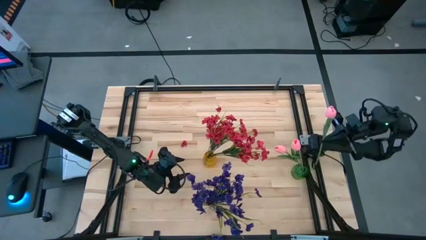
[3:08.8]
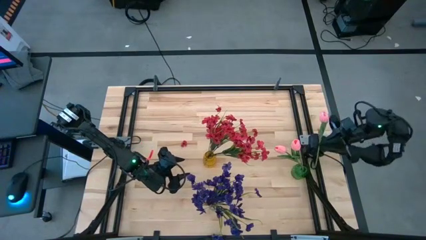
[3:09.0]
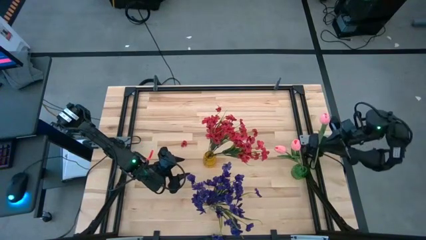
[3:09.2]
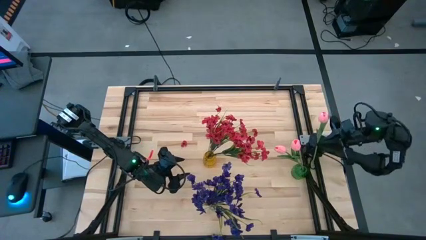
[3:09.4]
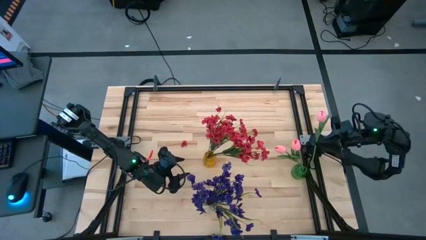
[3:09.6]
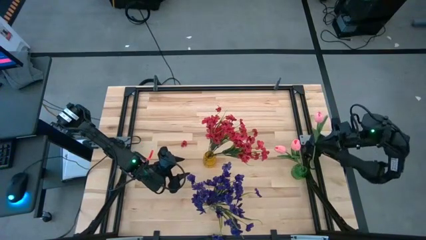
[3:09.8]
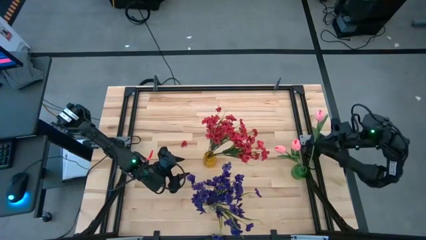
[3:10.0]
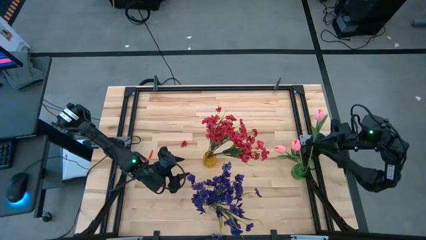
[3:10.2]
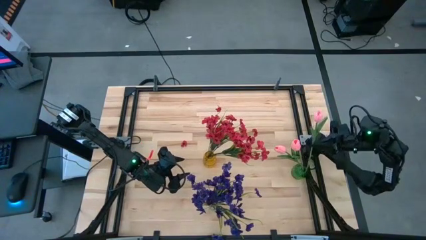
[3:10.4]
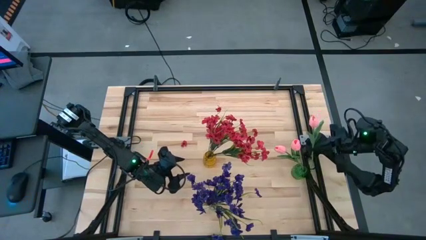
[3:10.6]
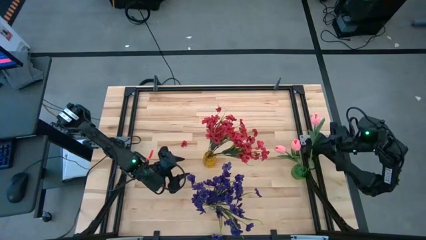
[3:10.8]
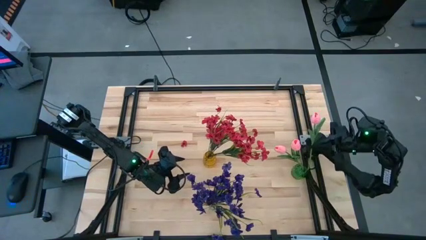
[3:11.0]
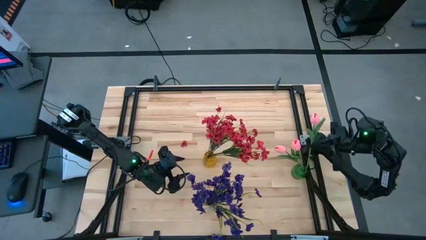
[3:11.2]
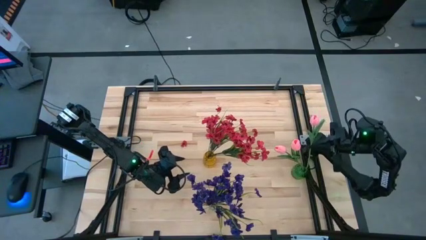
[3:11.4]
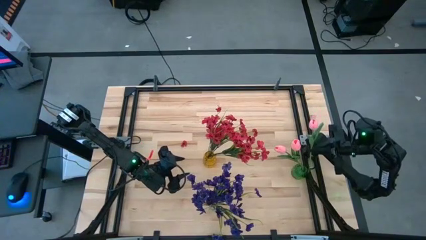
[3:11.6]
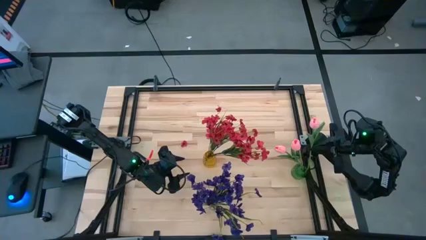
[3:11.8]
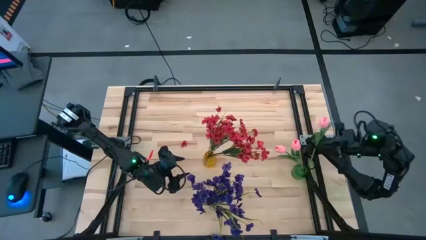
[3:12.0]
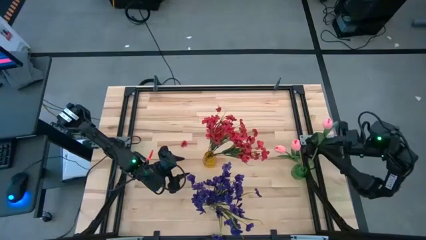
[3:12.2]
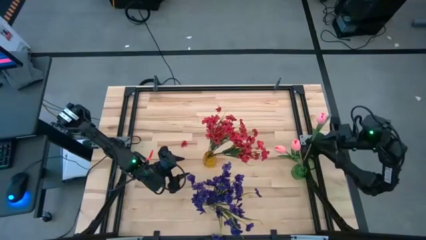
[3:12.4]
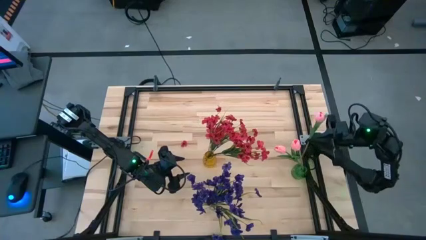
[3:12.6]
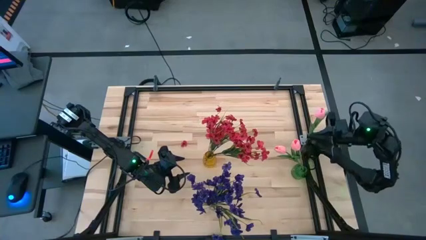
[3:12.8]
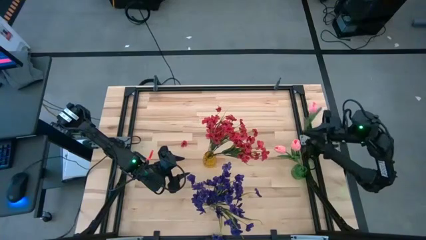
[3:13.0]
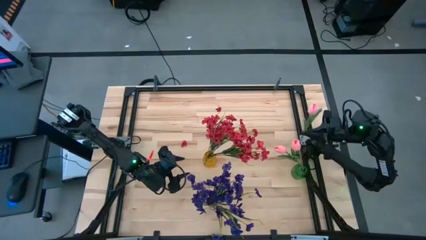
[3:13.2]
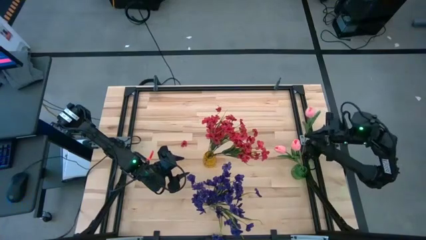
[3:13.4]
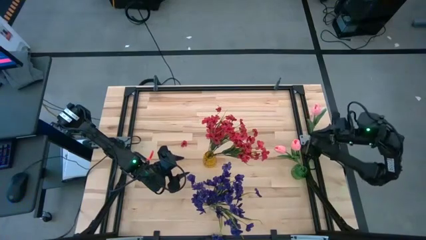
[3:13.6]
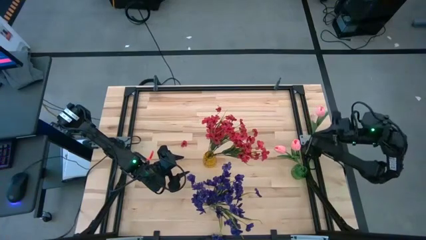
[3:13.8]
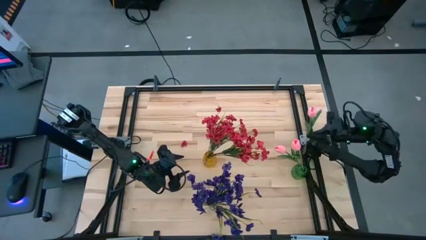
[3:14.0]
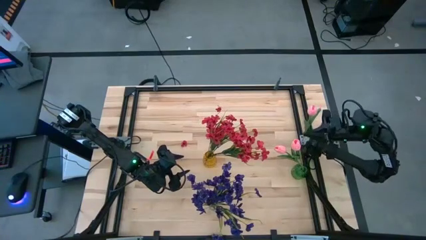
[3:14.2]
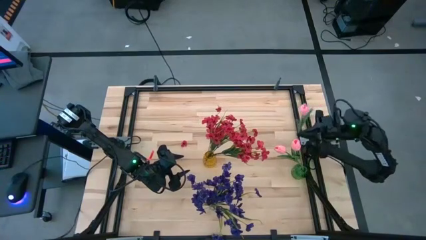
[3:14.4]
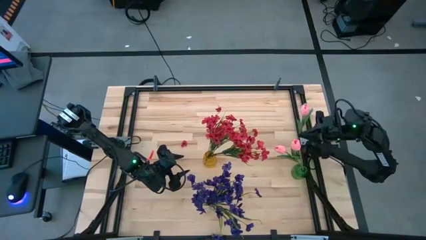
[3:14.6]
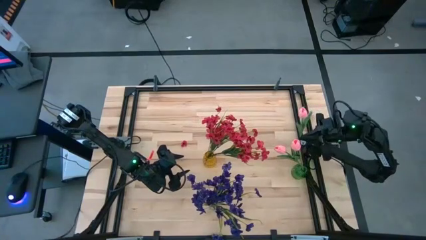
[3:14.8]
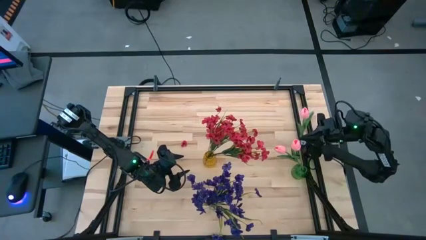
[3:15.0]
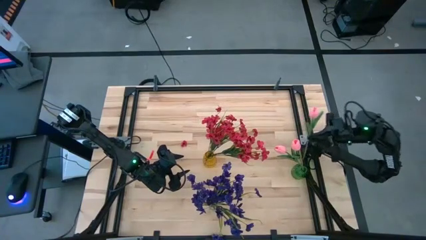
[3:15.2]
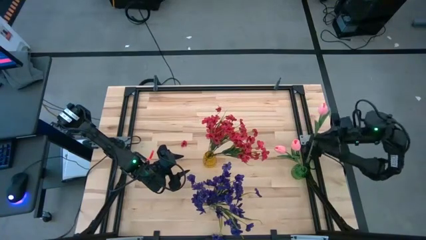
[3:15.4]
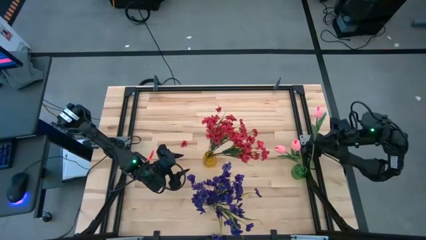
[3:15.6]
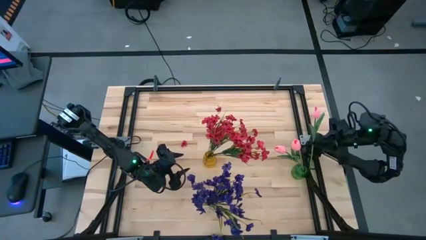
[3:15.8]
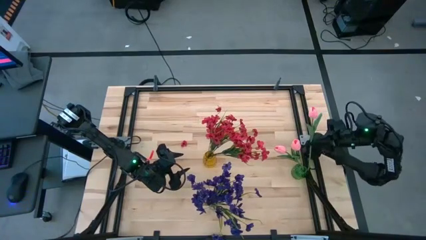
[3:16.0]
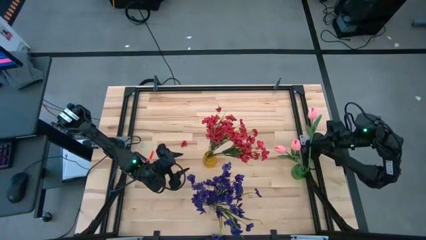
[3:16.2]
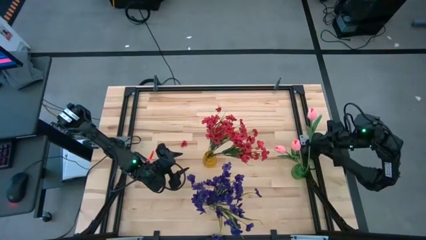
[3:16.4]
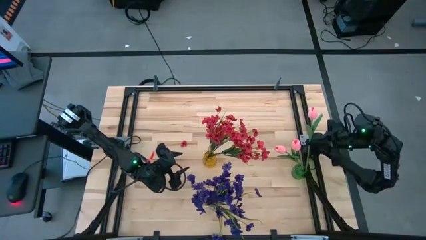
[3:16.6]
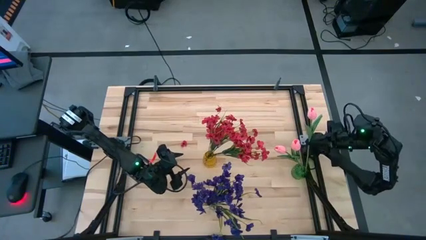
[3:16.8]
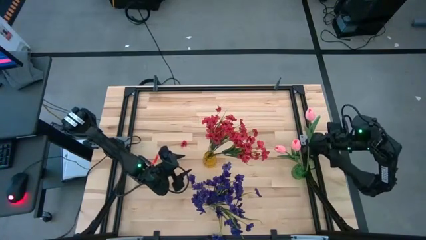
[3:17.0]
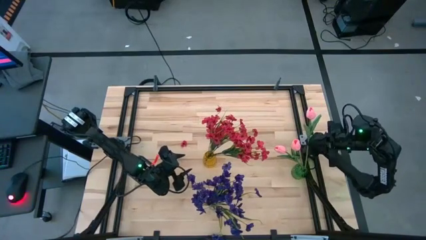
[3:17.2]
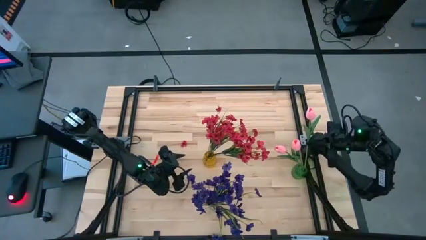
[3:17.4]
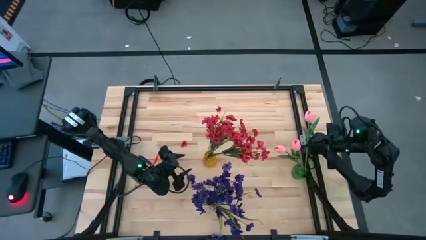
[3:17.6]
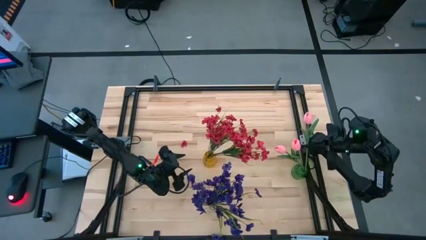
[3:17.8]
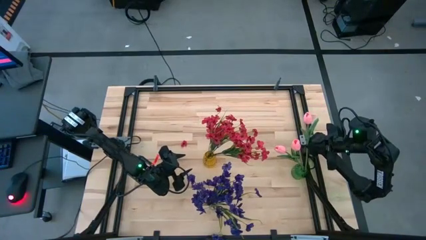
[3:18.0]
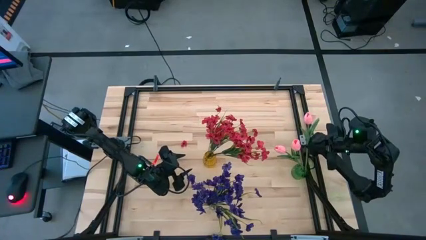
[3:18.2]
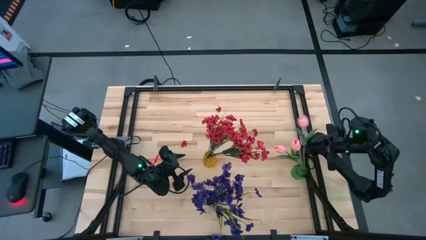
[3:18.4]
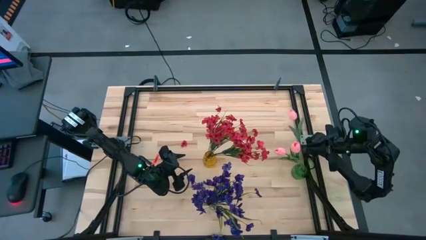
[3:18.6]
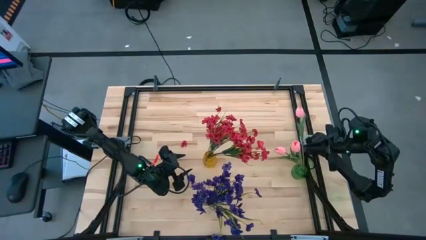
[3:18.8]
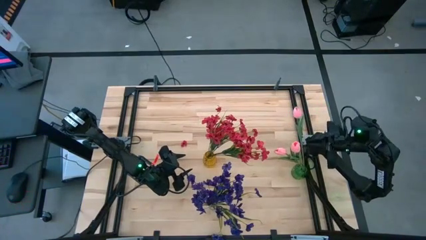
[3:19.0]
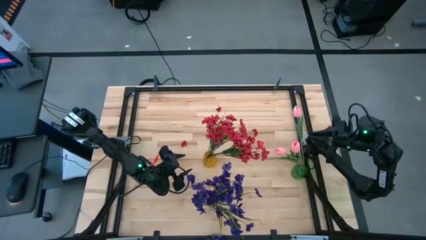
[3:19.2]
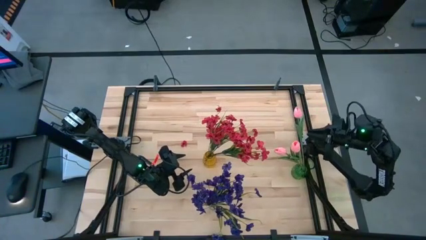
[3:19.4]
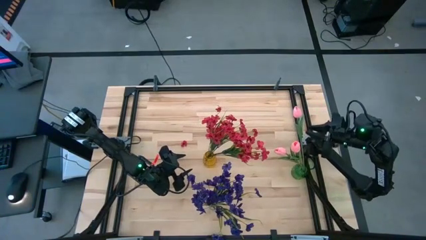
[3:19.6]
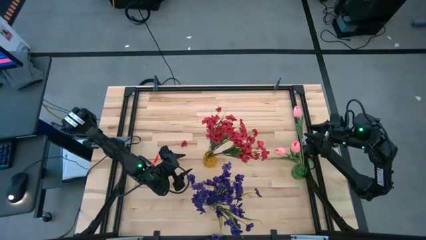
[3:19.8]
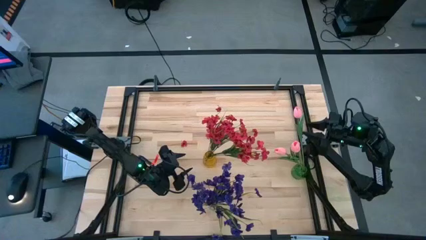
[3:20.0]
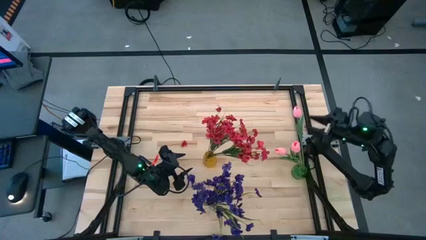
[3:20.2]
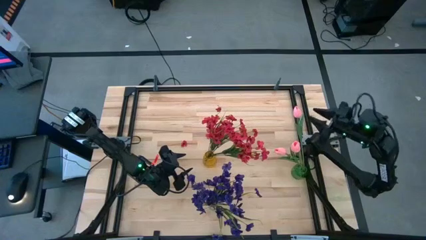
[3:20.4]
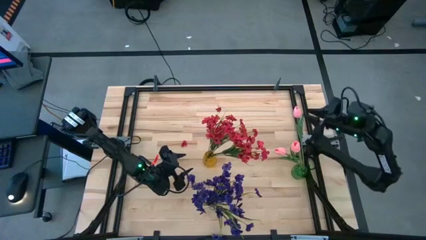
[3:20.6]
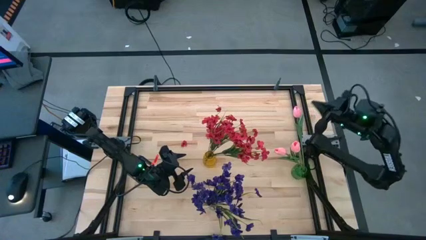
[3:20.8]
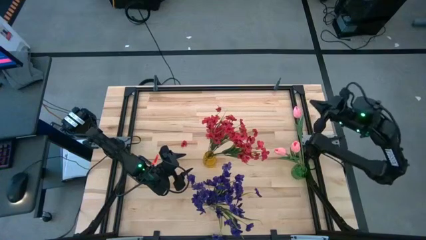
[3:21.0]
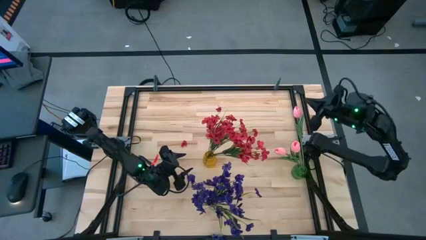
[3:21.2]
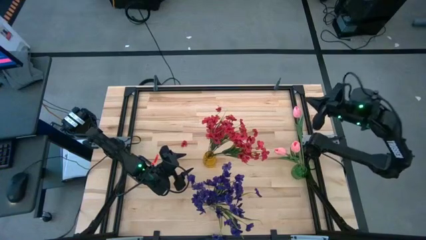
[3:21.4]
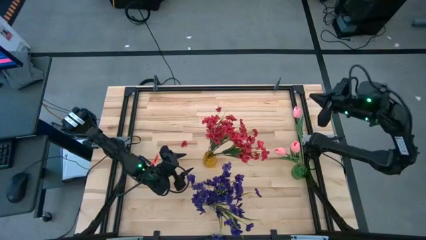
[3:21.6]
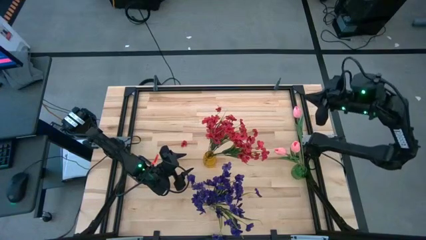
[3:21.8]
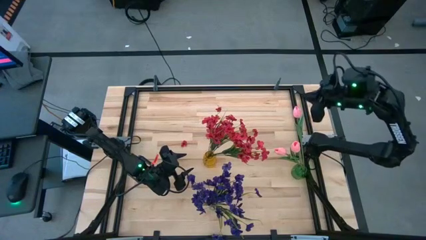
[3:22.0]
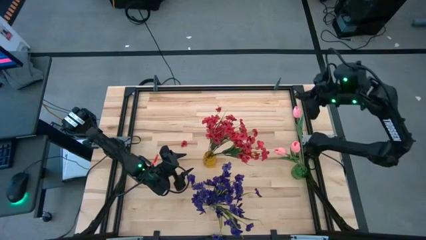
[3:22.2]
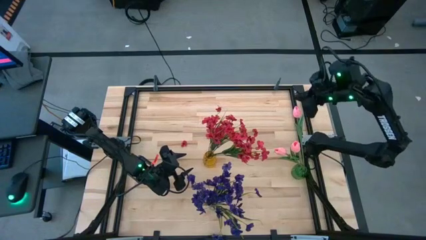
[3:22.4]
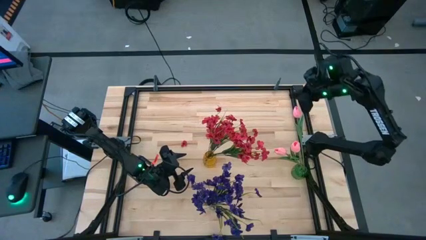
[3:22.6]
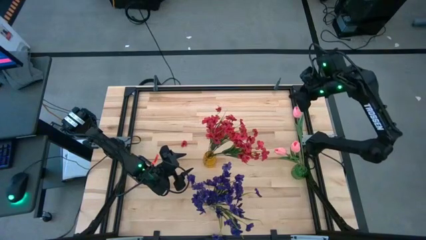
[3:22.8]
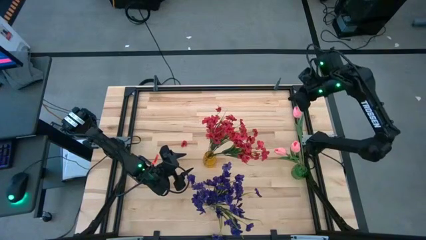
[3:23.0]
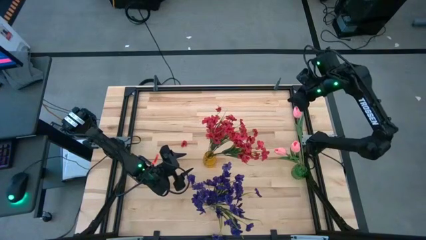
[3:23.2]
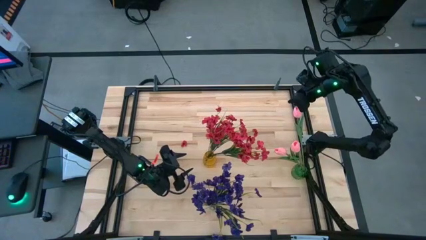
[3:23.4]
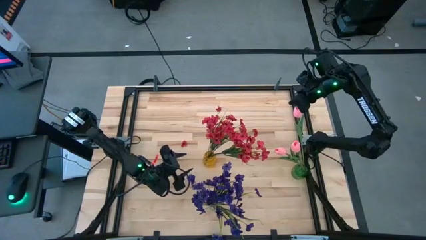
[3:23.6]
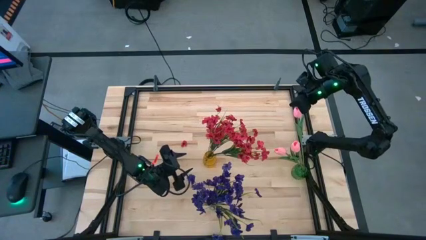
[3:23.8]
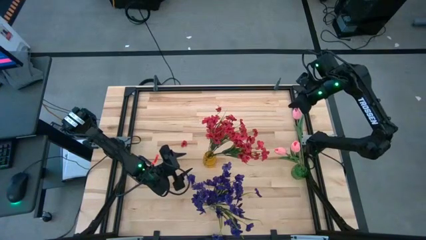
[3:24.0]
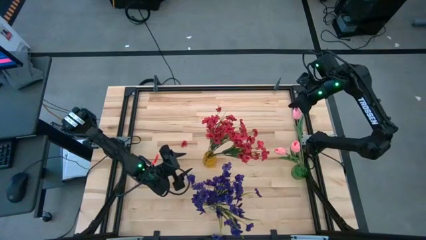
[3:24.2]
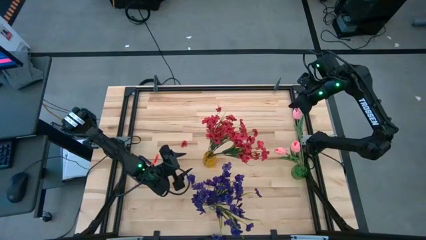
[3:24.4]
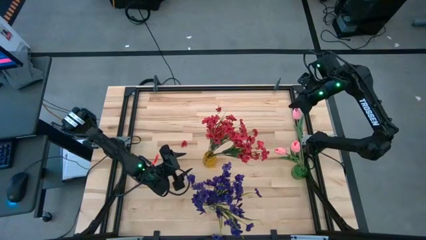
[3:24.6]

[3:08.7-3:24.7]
Task: Sort flowers into vase by color
Put the pink tulip into the green vase
